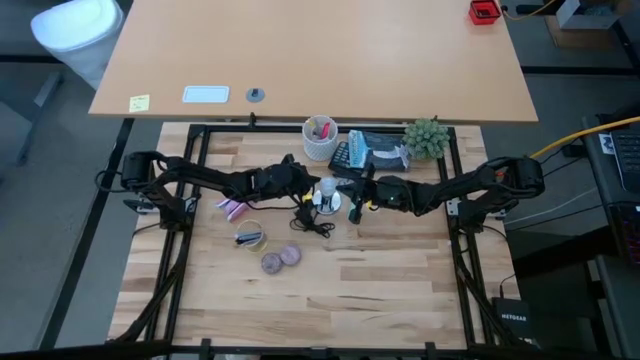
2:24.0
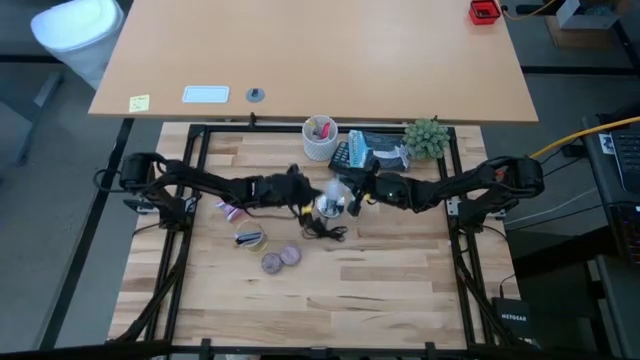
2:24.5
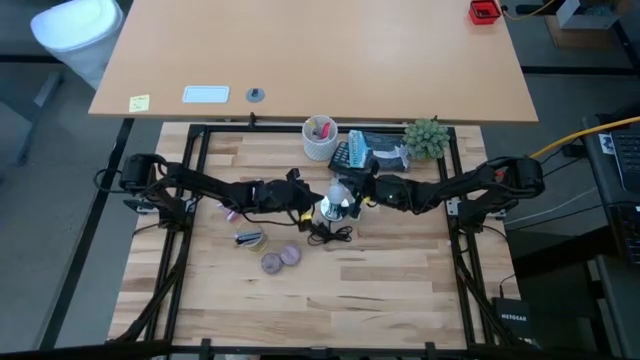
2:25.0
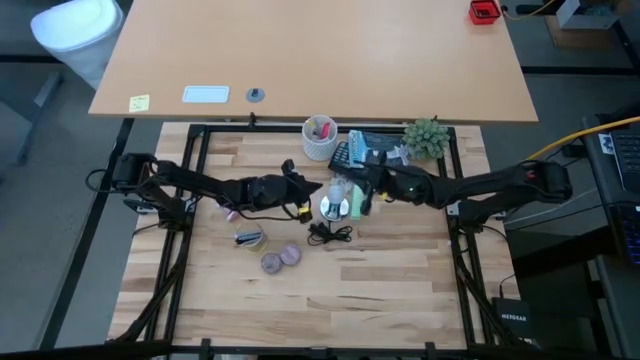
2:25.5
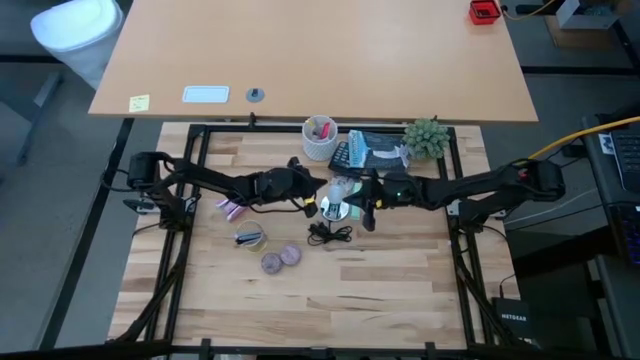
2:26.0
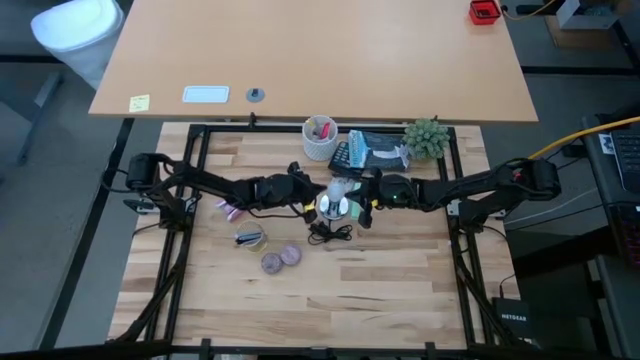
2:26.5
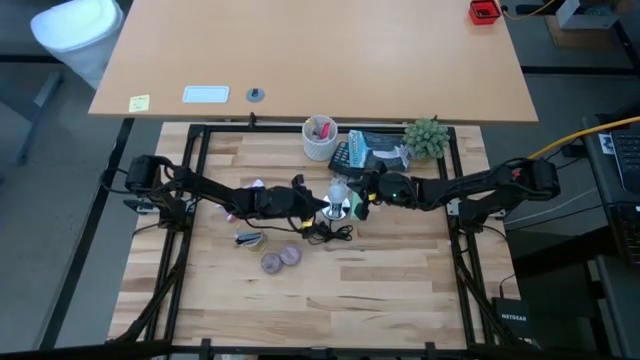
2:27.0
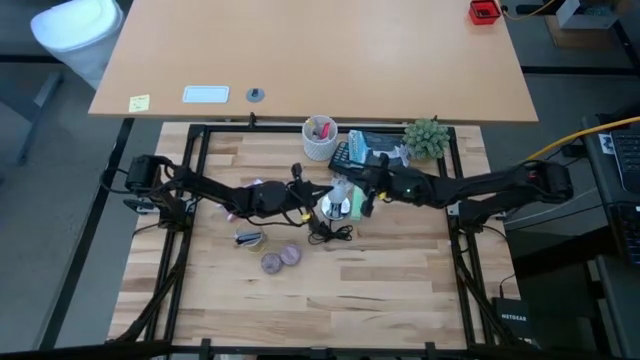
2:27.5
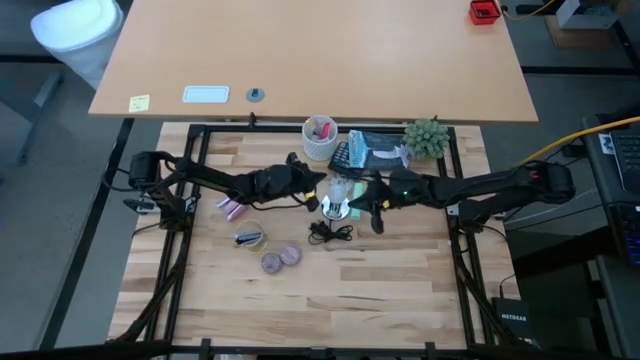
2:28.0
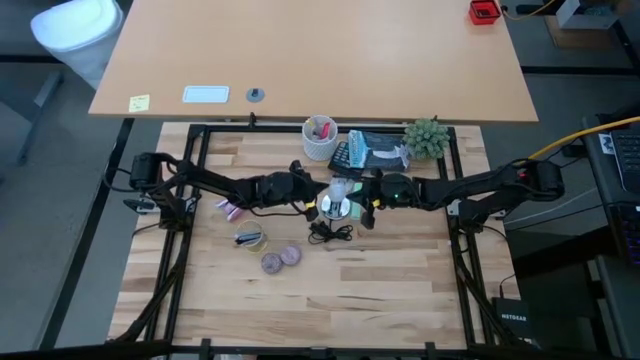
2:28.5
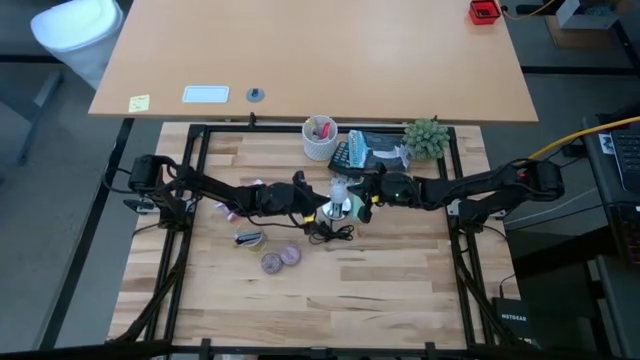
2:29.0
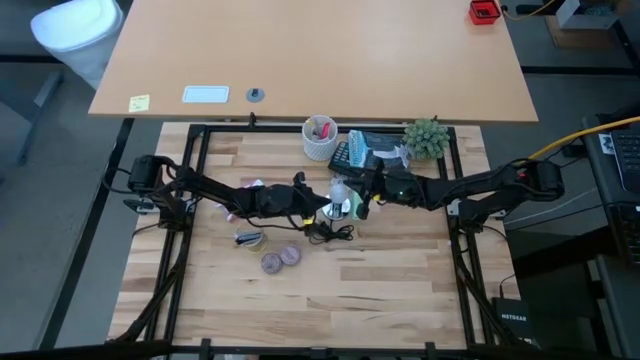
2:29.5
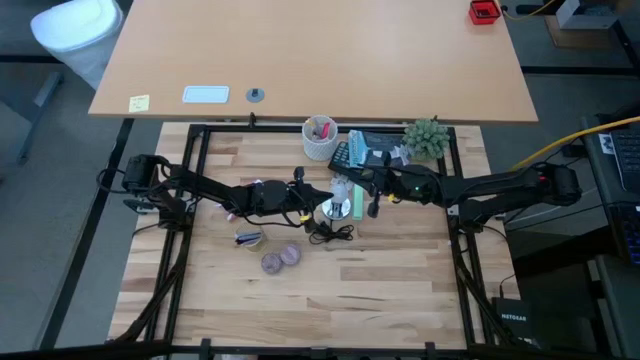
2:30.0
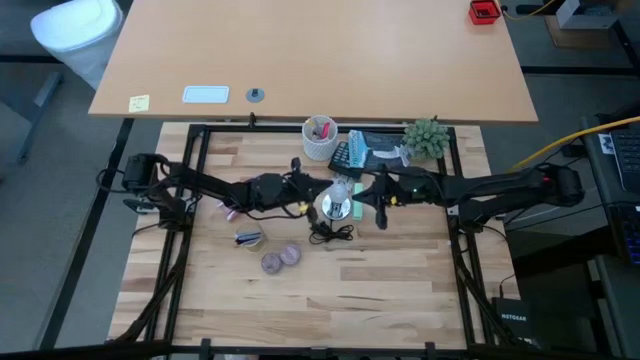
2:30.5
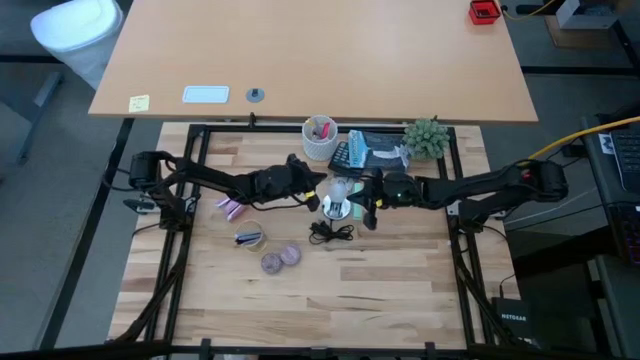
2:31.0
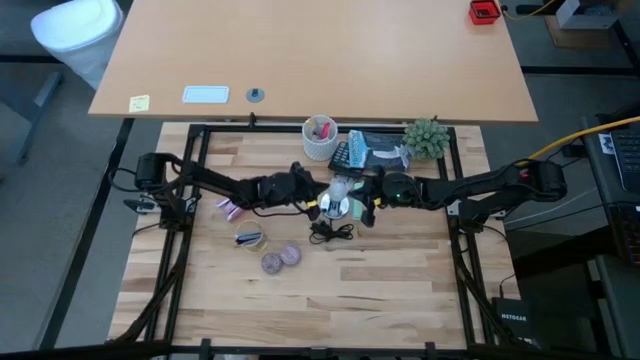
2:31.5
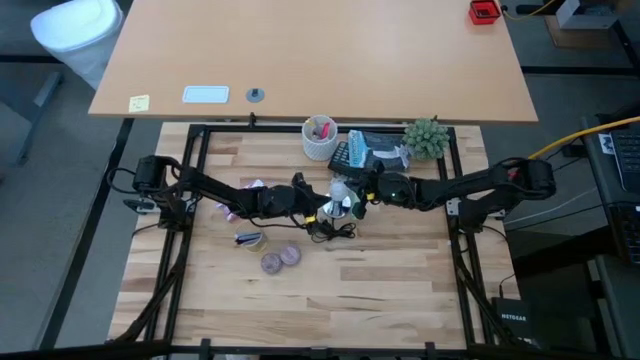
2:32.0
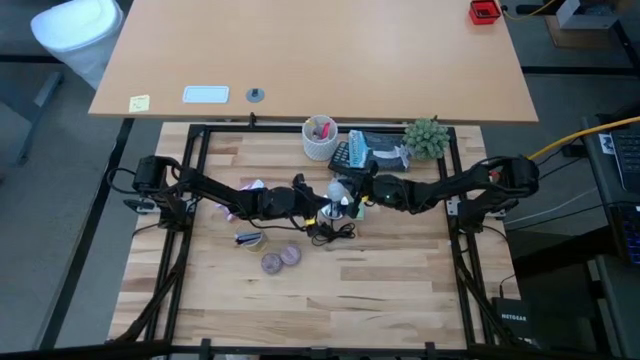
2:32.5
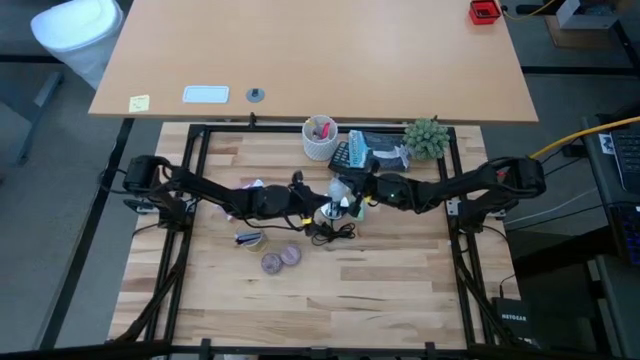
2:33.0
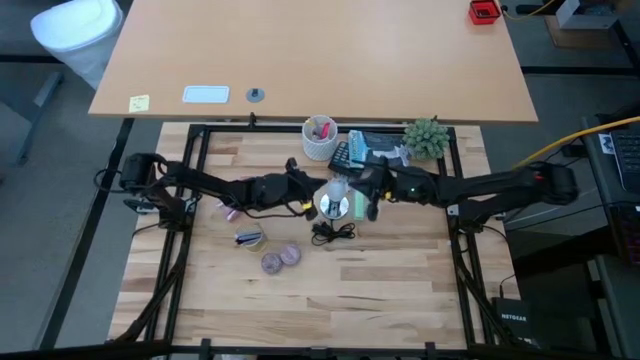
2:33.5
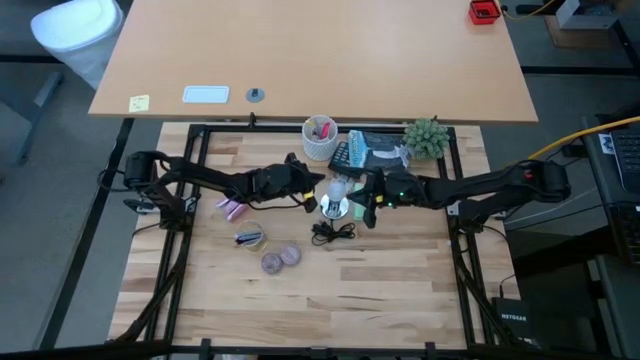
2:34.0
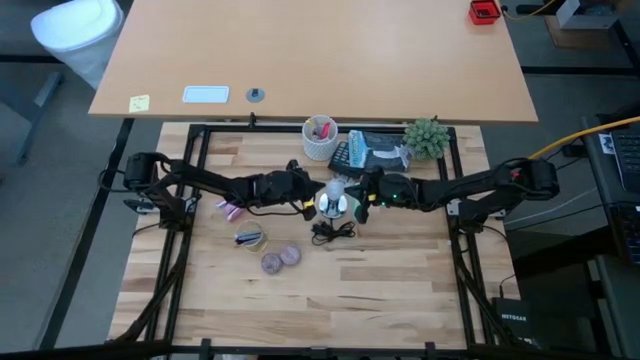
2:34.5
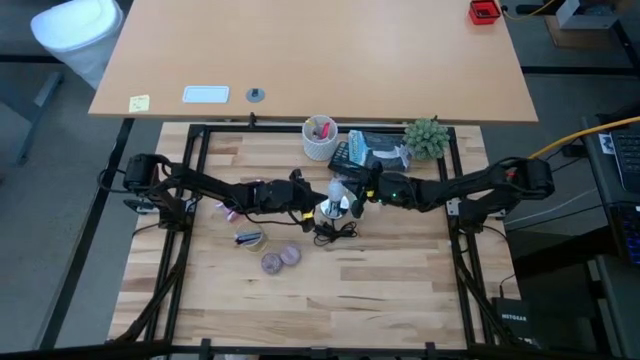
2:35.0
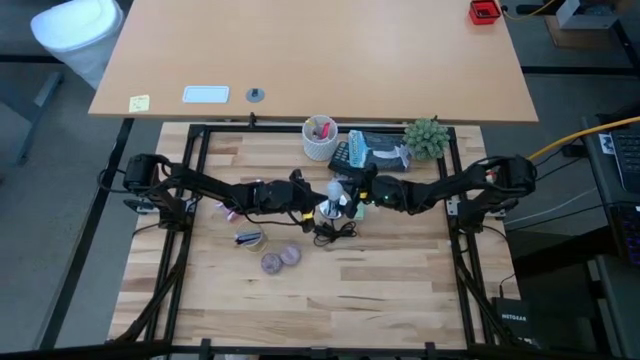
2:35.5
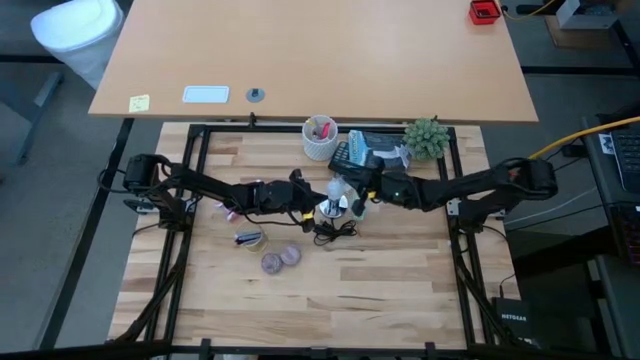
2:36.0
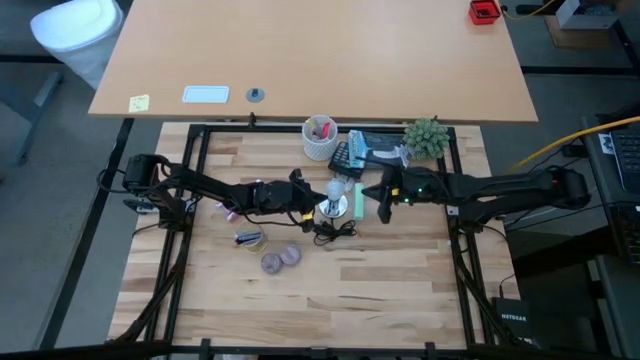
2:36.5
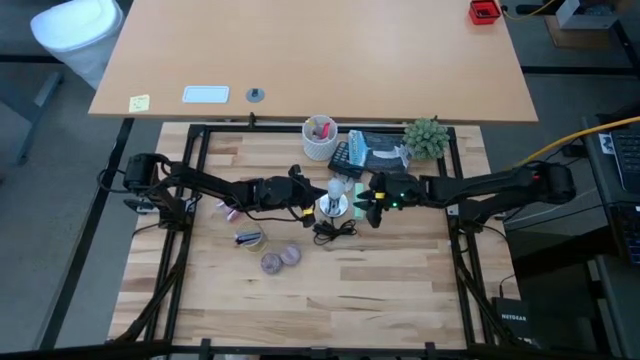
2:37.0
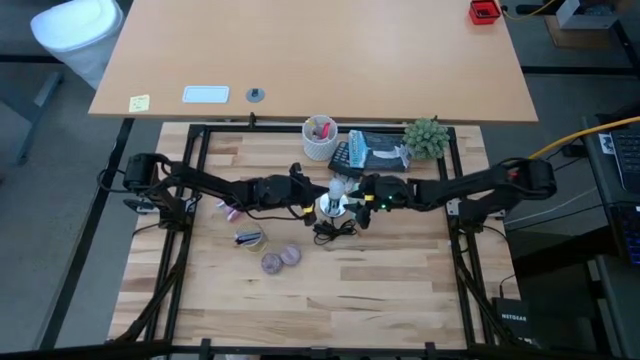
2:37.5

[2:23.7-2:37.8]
Task: Screw lightbulb
Remove the white lightbulb from the silver lamp

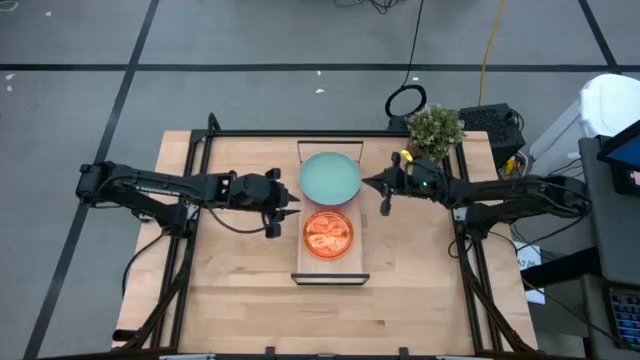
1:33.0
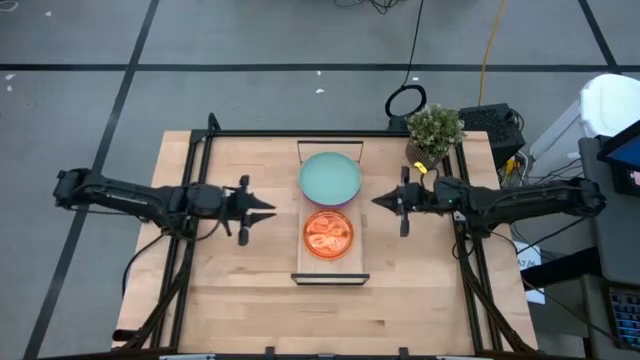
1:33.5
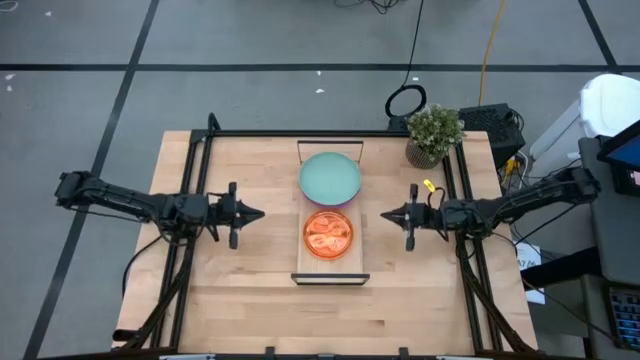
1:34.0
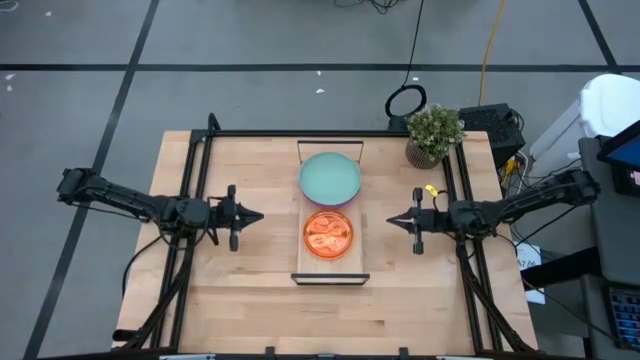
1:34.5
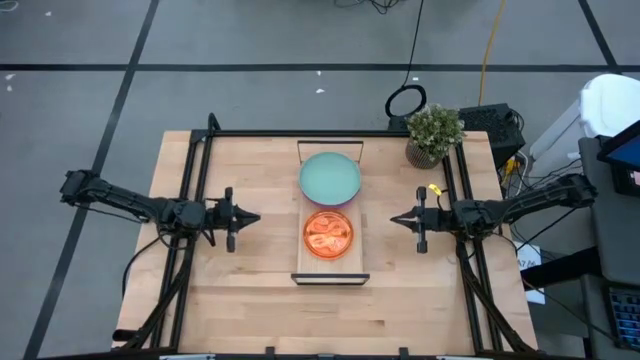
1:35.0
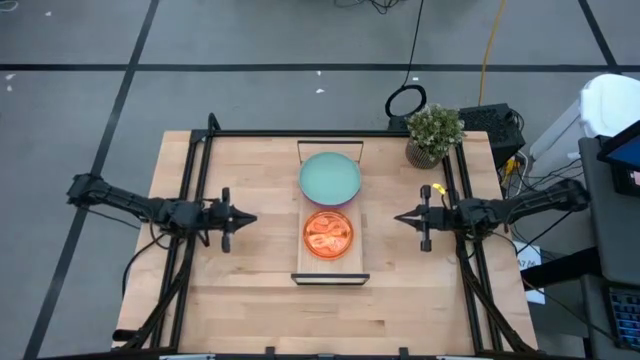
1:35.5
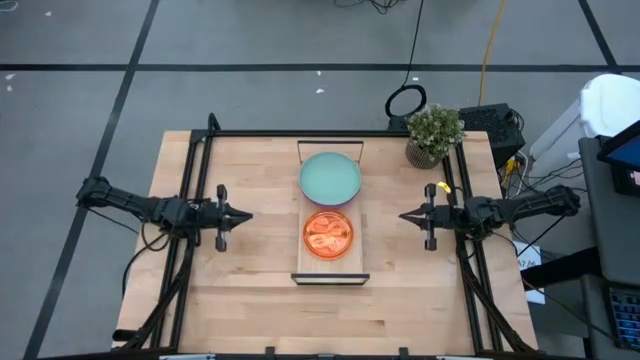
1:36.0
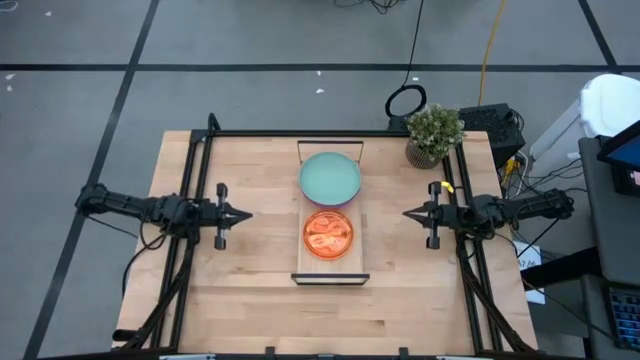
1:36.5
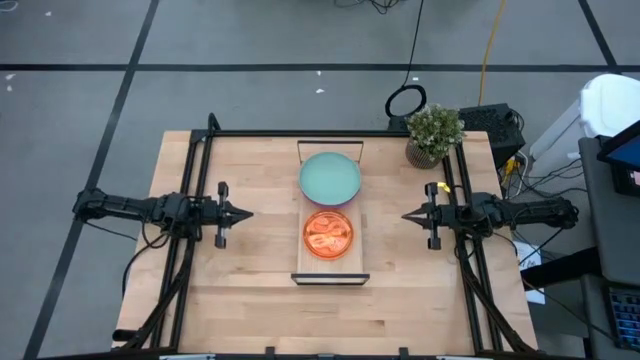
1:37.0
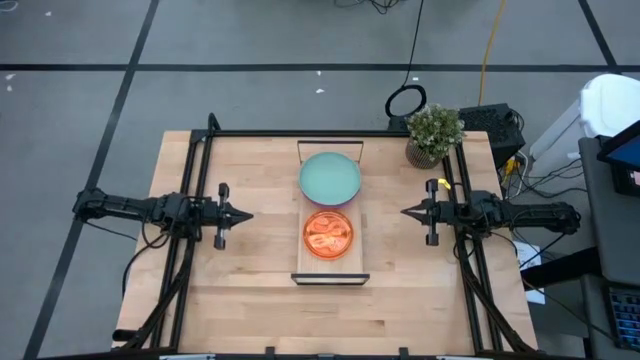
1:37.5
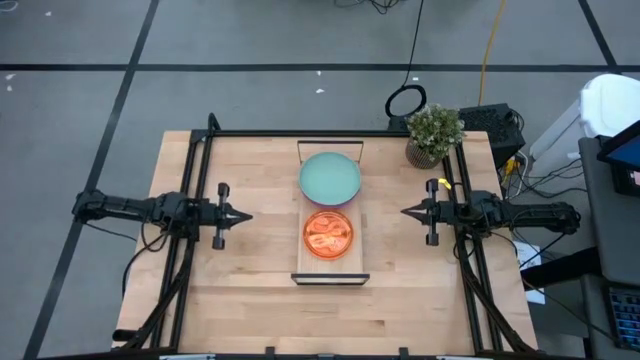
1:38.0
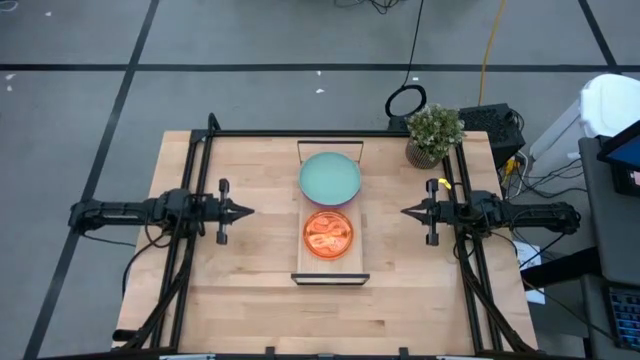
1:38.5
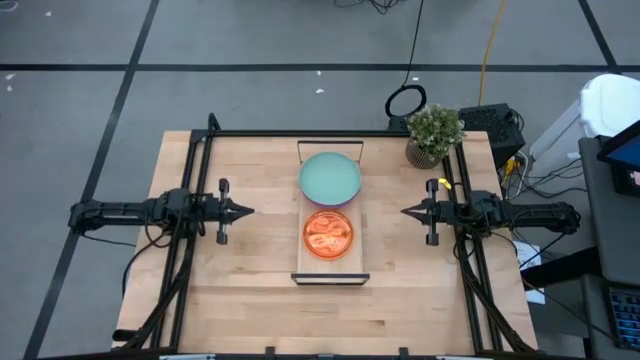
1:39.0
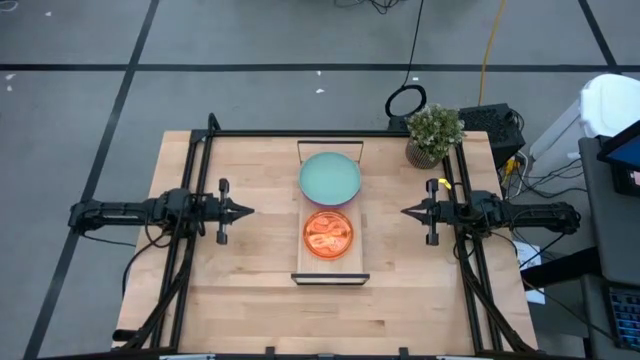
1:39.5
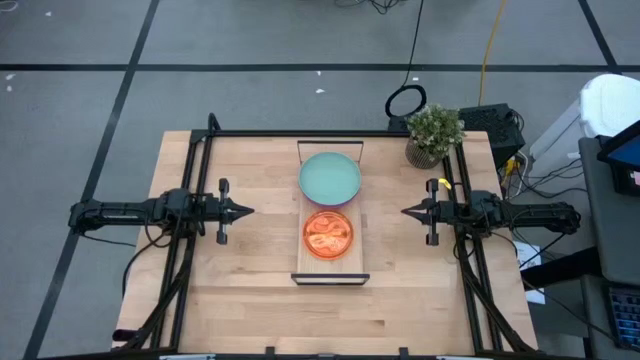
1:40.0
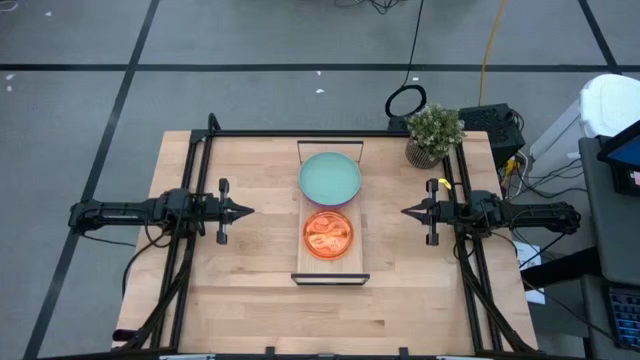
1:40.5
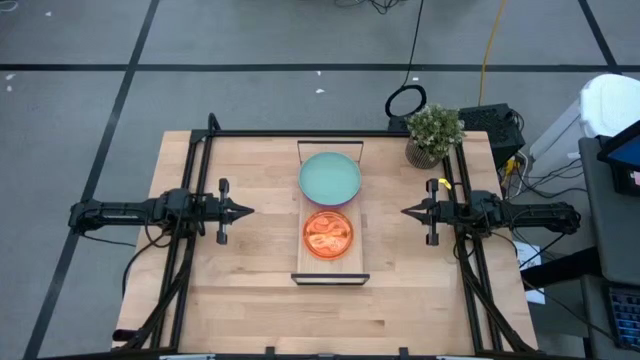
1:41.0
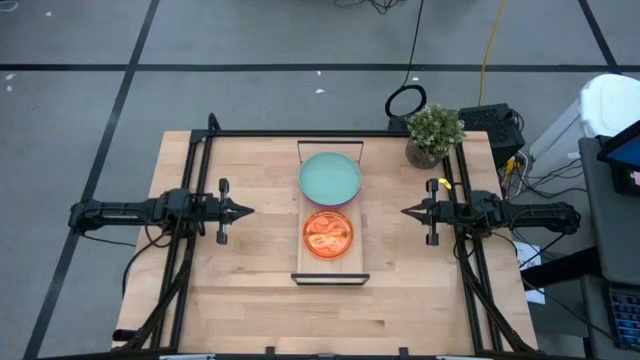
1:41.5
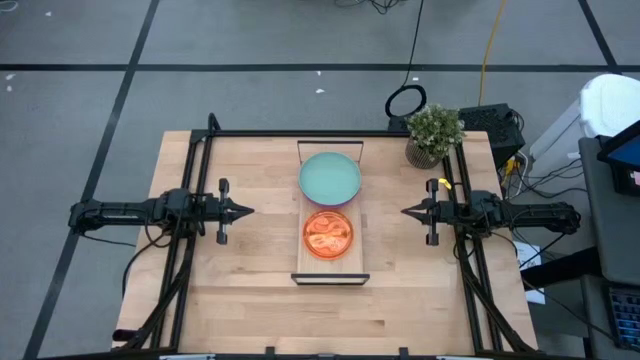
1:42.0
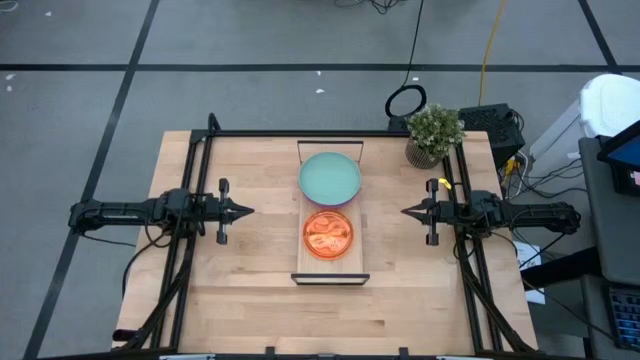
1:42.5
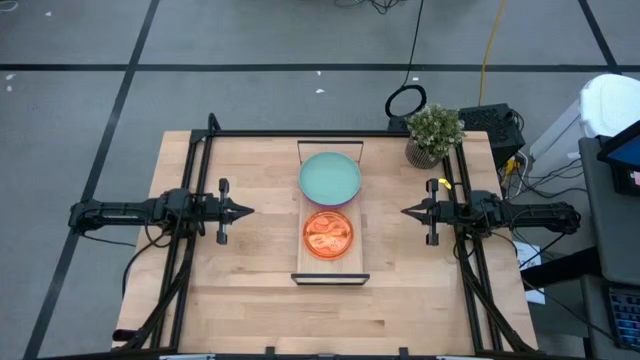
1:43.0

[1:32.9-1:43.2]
Task: Place and stack plates onto a shelf
Return to Home Position
